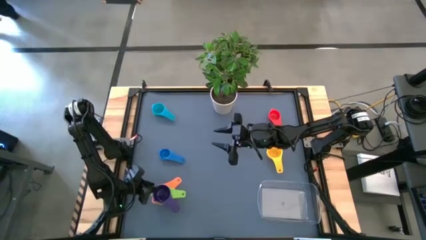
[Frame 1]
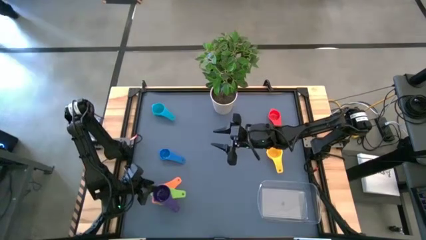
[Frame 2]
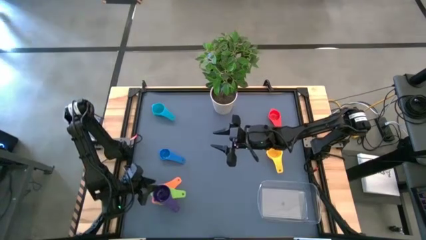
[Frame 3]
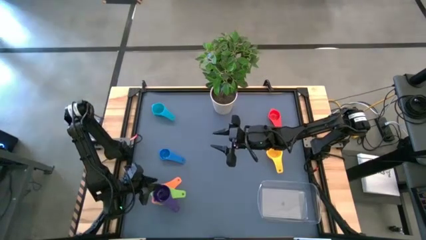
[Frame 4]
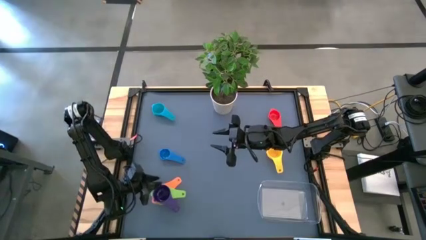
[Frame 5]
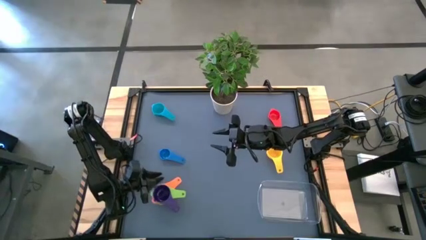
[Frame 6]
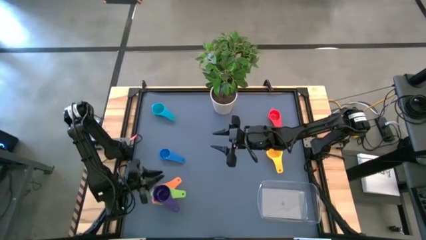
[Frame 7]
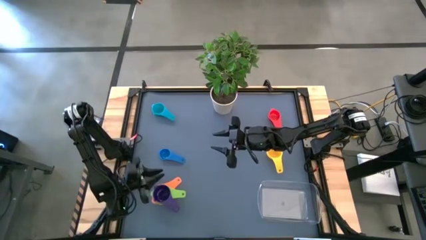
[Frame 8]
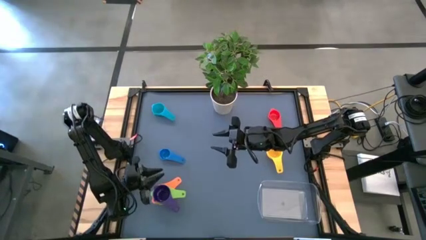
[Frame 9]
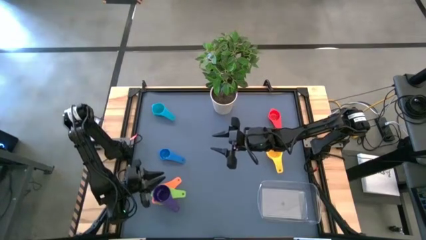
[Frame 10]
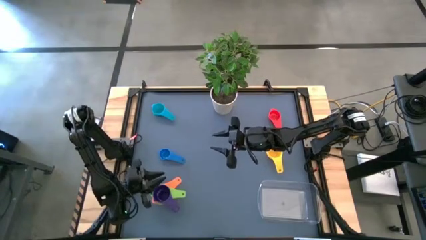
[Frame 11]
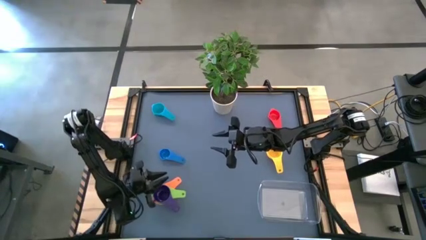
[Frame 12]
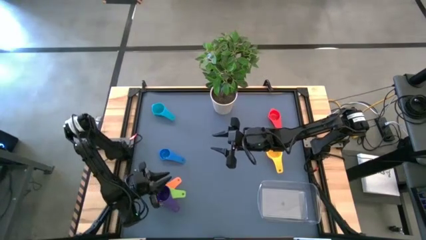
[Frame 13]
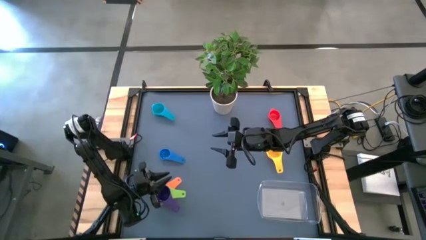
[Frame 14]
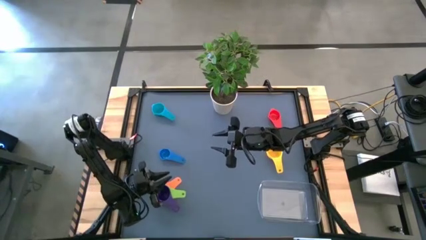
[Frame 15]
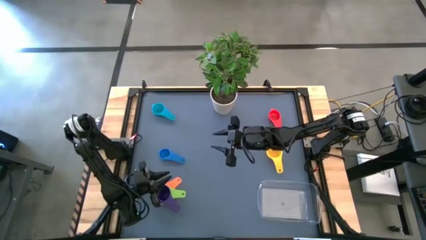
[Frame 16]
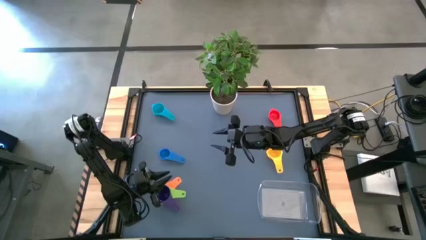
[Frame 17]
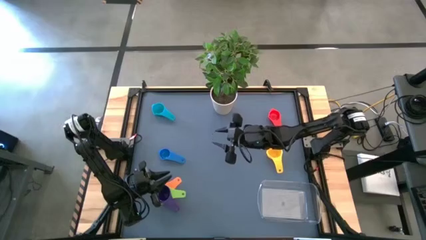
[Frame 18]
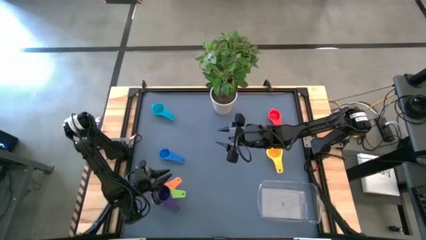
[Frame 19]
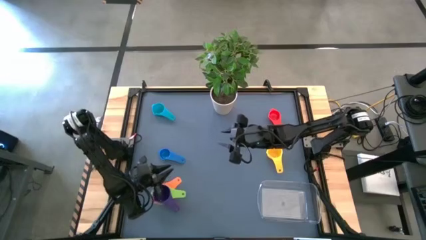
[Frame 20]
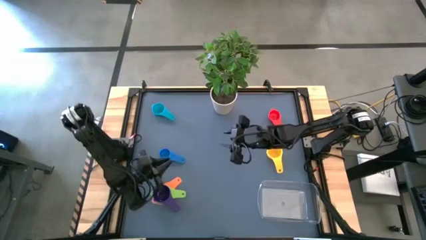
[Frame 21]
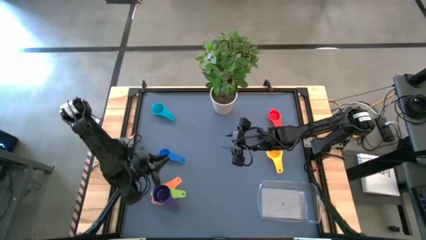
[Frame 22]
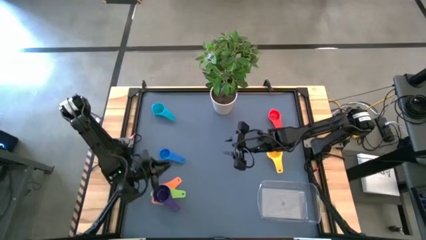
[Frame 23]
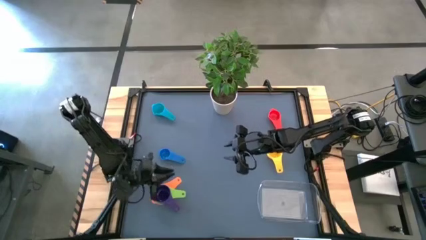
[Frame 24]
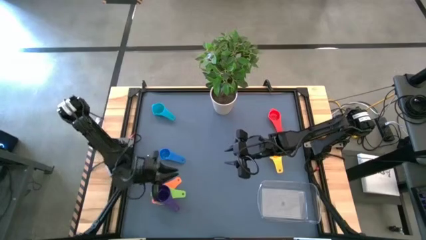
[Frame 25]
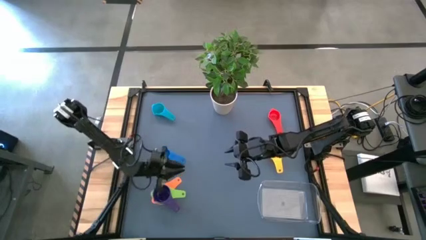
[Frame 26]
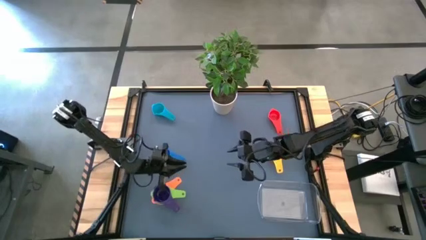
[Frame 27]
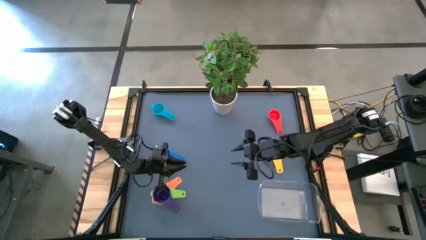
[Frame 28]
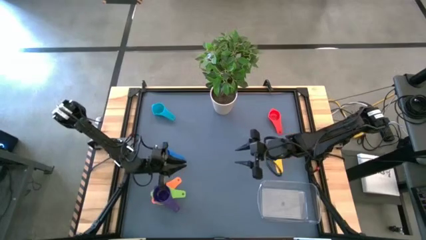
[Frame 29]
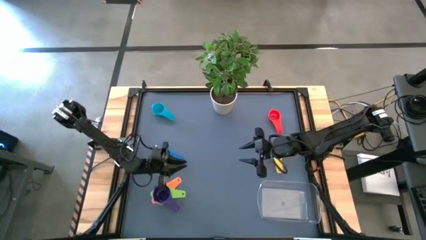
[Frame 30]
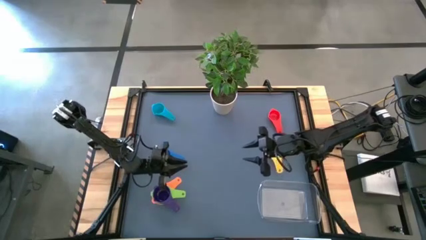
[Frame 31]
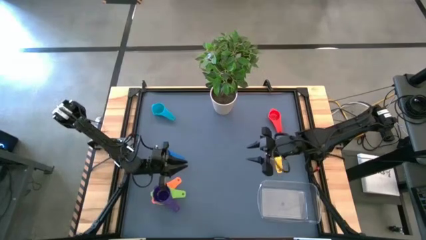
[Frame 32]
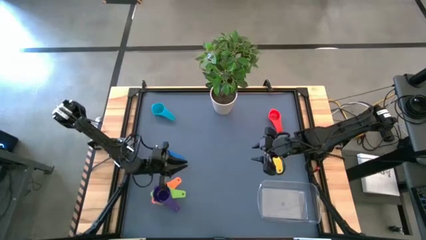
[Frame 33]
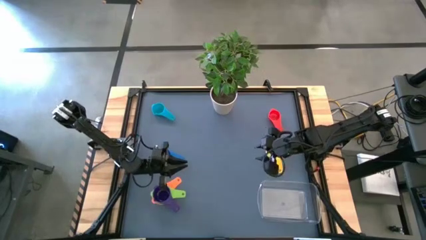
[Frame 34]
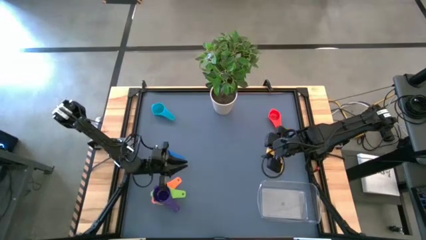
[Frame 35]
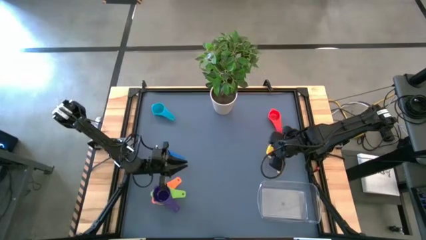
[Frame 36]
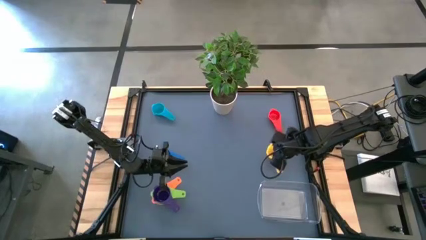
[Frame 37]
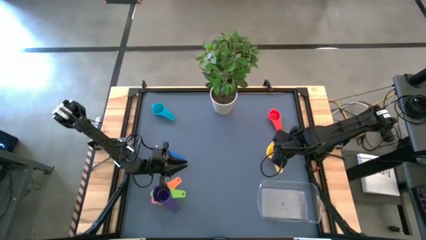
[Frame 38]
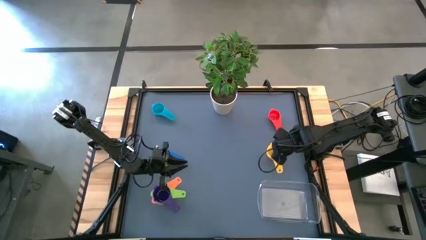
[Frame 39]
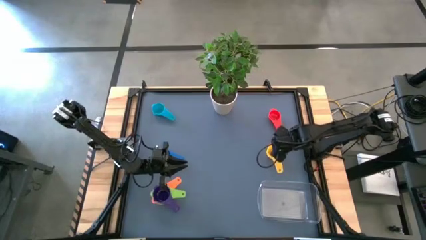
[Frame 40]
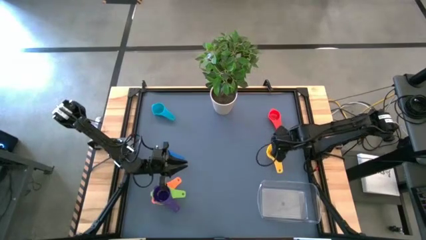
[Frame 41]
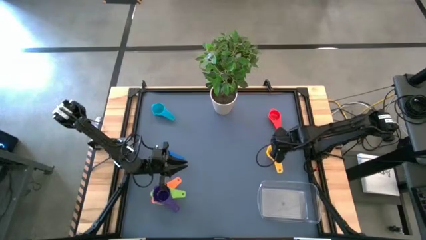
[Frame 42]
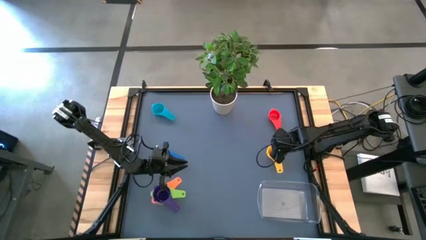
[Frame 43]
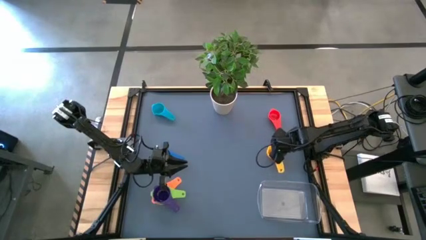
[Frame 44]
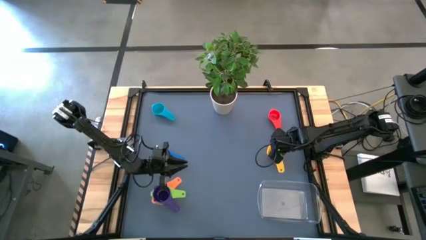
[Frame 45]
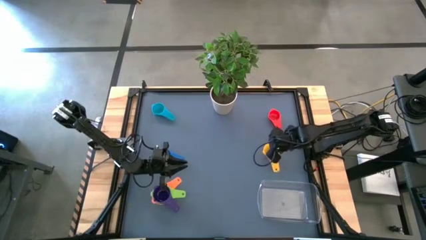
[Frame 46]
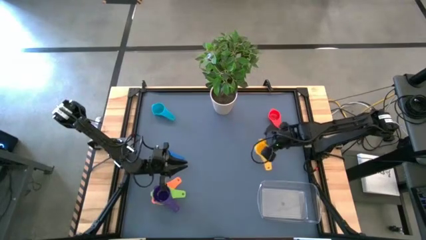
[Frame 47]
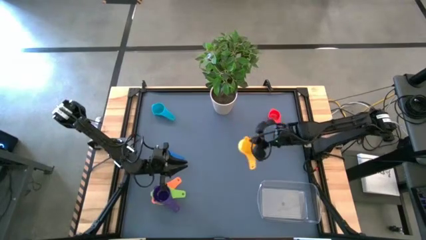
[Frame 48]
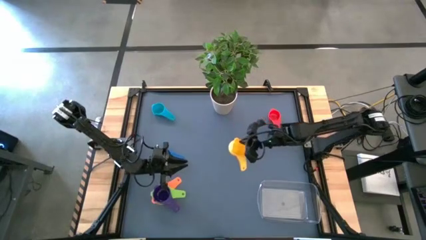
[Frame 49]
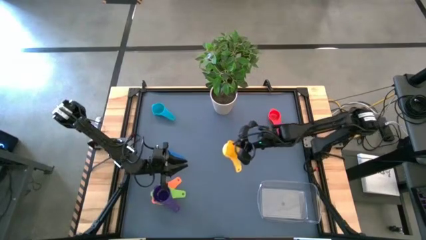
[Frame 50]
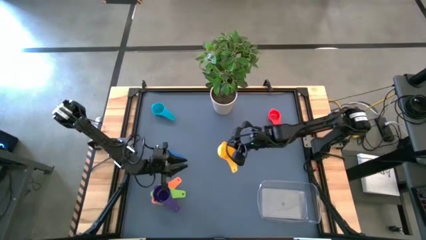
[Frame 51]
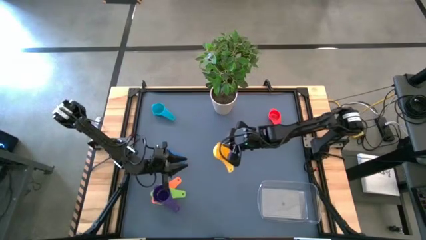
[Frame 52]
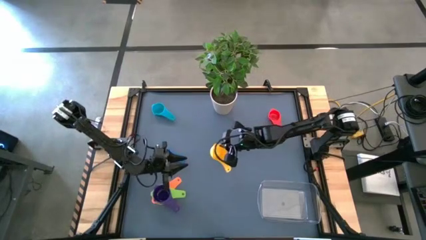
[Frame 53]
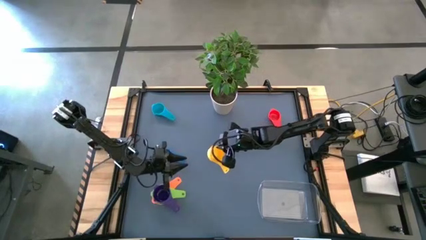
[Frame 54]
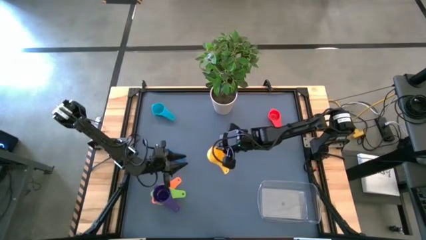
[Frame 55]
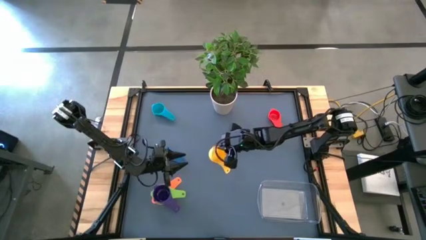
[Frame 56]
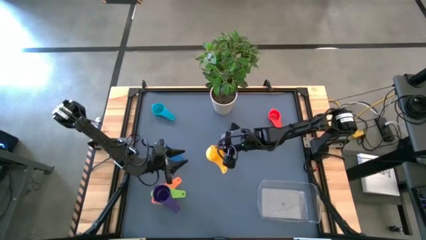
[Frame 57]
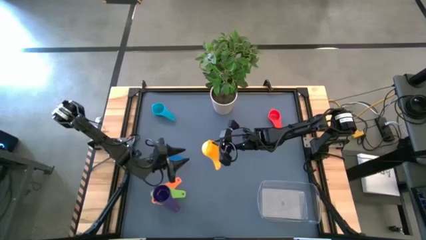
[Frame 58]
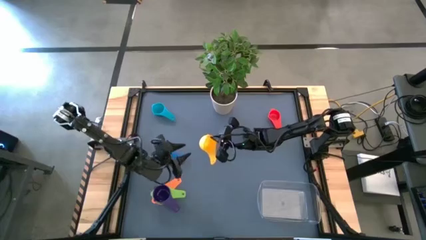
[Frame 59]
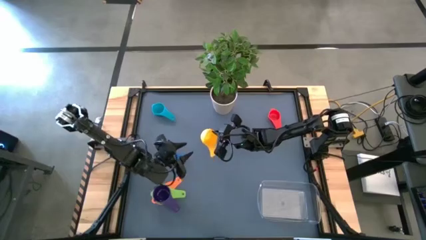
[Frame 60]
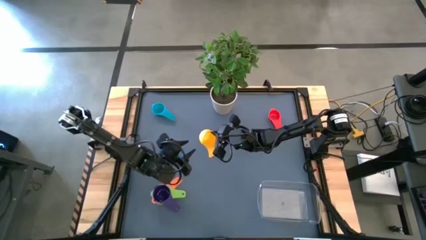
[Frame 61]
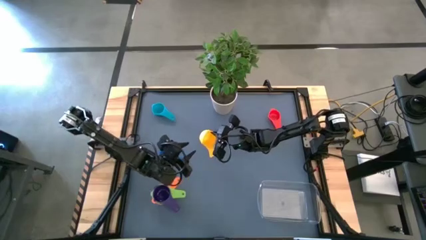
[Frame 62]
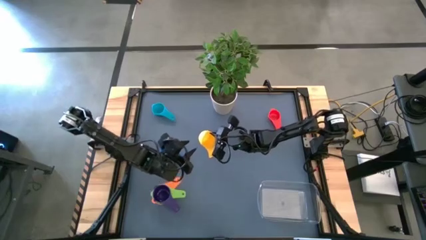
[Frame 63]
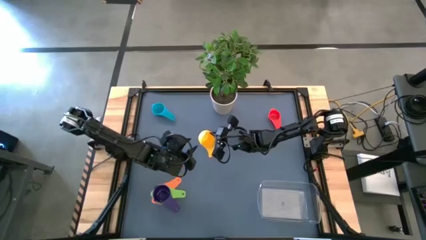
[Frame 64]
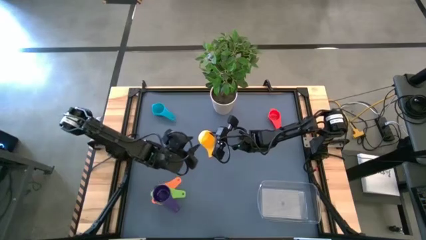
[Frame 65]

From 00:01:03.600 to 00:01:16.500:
Task: Nest measuring cups in basket
Stack the yellow measuring cup on top of the violet measuring cup

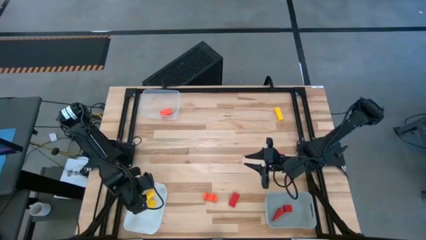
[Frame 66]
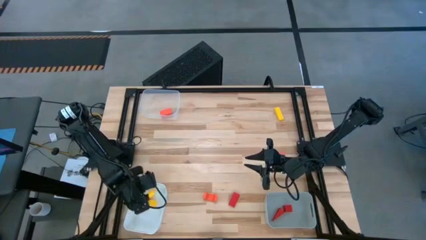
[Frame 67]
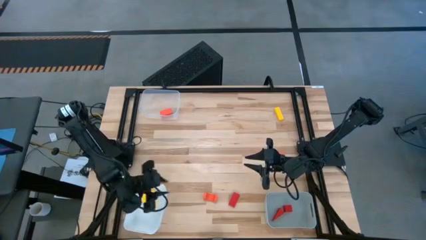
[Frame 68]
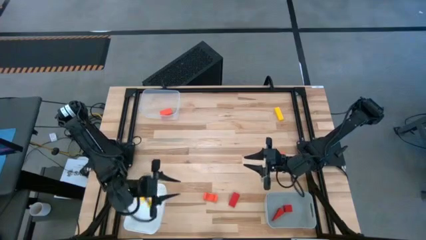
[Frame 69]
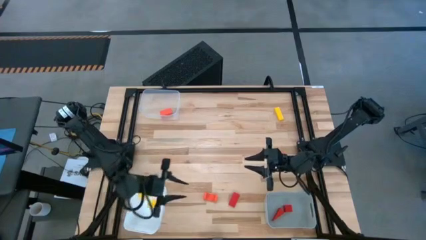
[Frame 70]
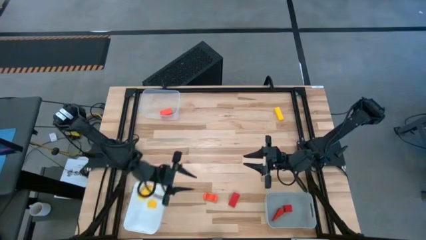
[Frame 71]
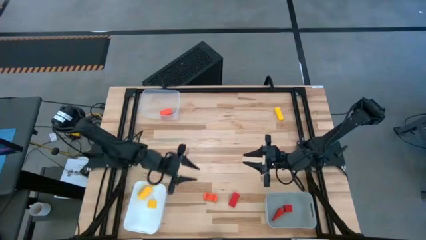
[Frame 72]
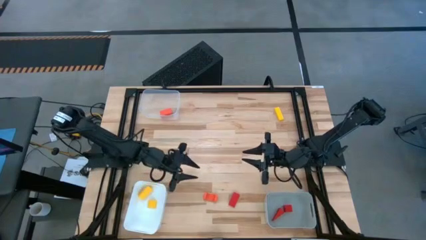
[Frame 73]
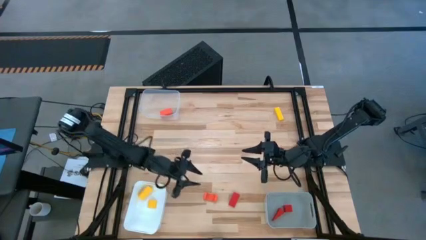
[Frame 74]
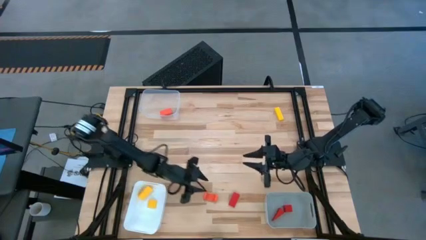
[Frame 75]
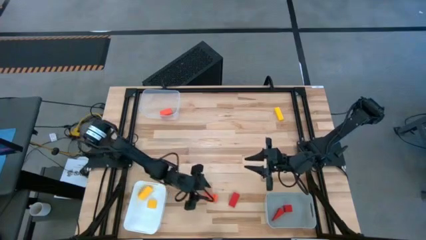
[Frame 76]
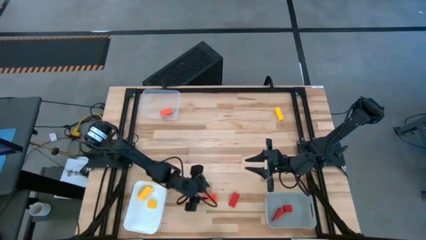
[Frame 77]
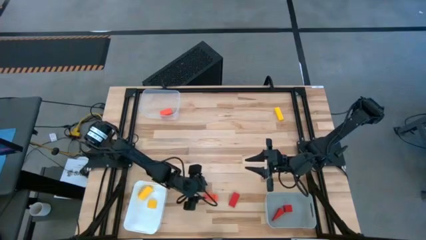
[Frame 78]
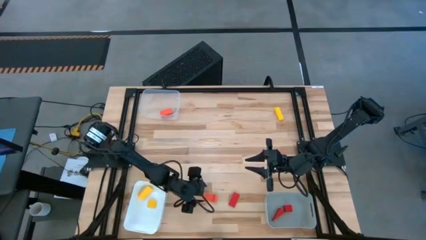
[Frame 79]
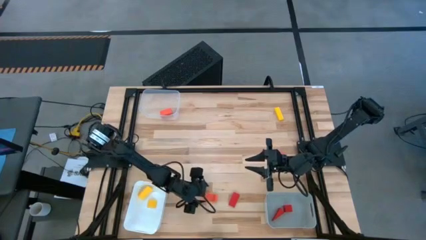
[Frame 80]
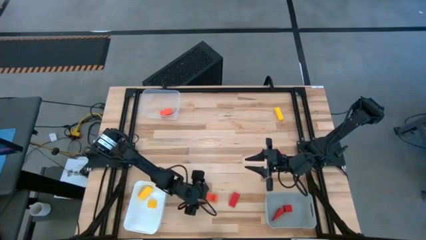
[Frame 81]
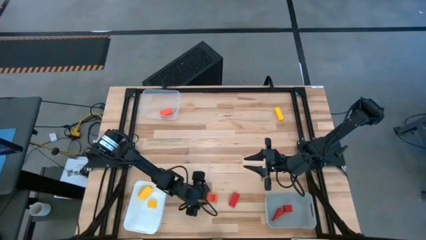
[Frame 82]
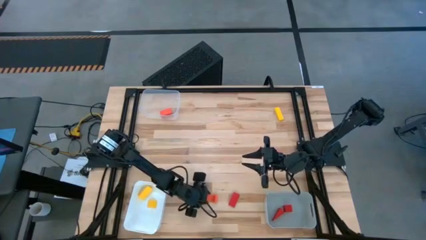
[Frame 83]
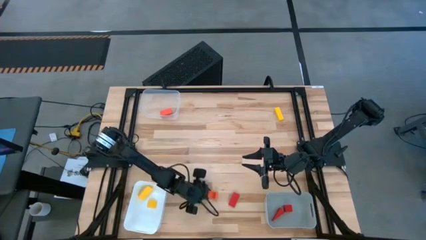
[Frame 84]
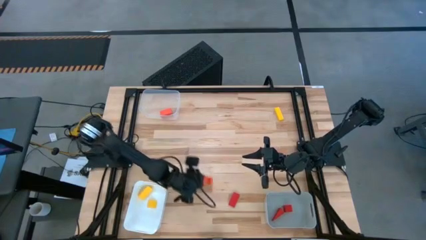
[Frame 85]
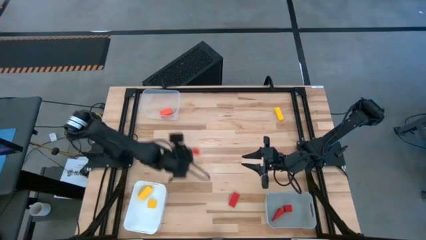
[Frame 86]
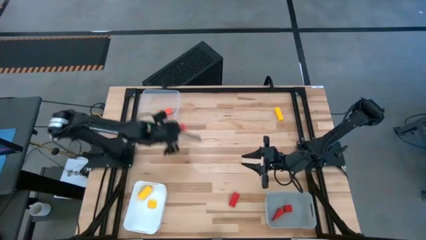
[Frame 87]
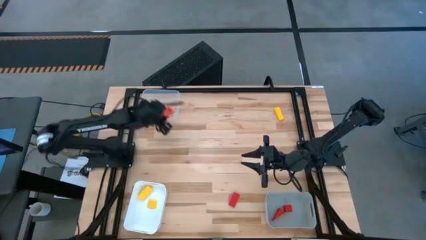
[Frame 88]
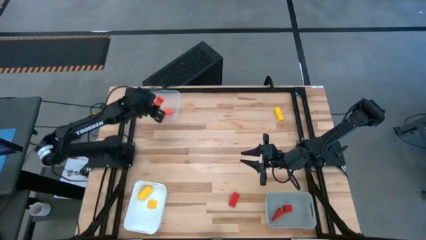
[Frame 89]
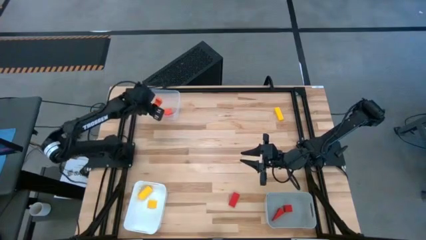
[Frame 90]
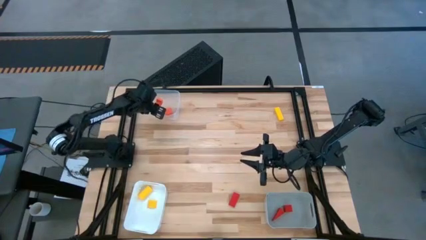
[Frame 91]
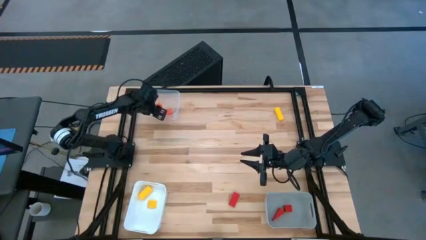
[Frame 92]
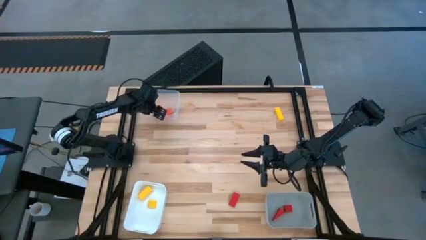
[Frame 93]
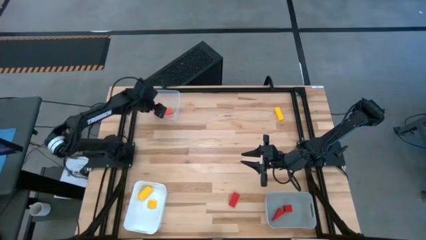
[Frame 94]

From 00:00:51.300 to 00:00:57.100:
Task: Sort & place blocks by color
Put the bottom orange block into the transparent bin
